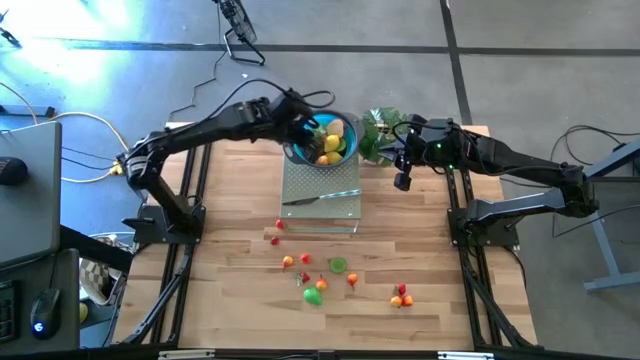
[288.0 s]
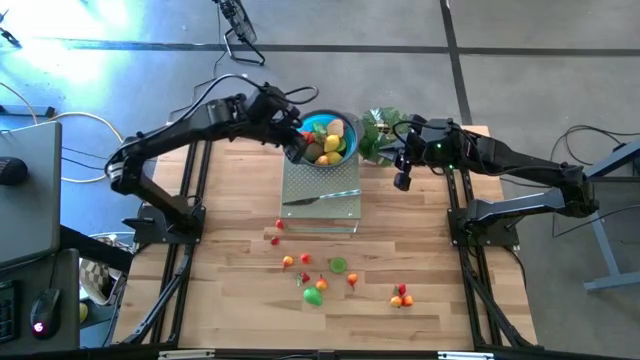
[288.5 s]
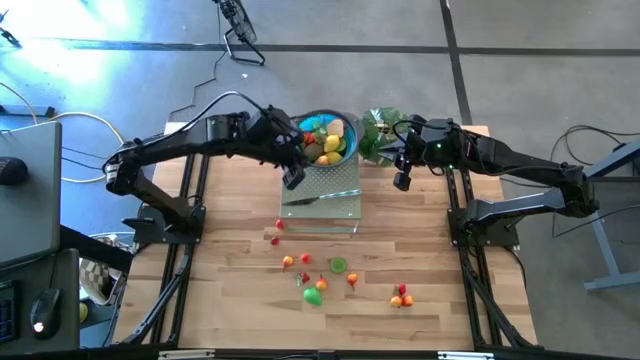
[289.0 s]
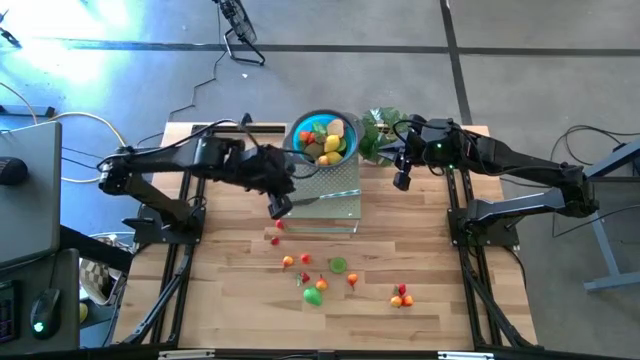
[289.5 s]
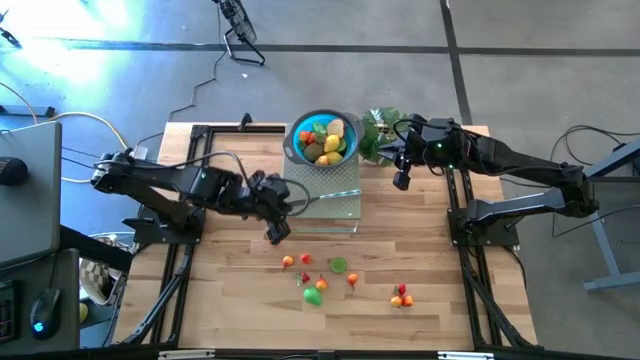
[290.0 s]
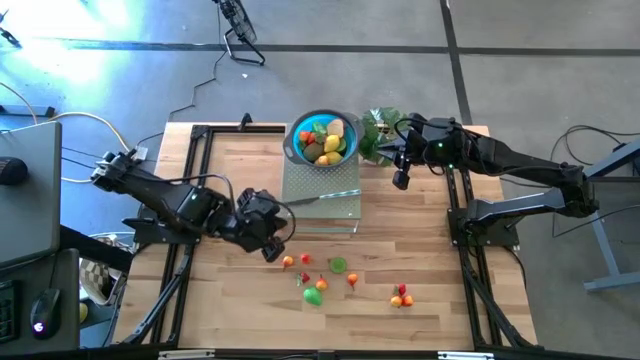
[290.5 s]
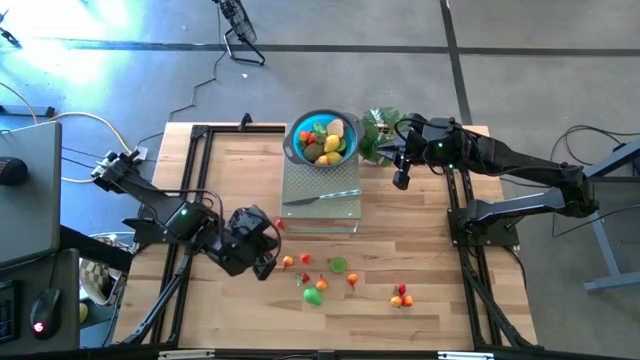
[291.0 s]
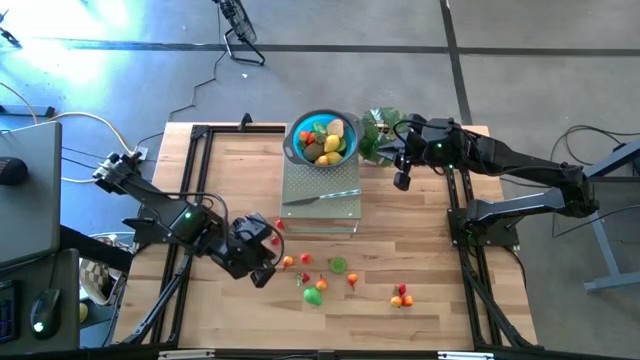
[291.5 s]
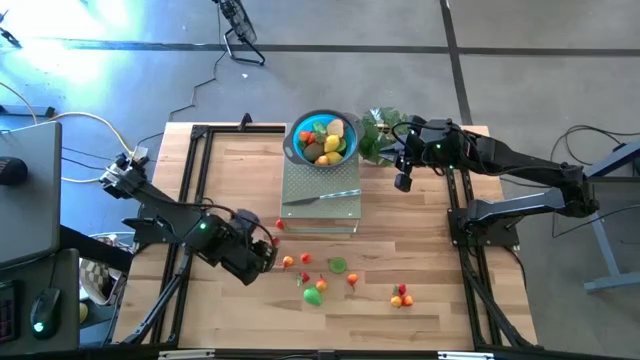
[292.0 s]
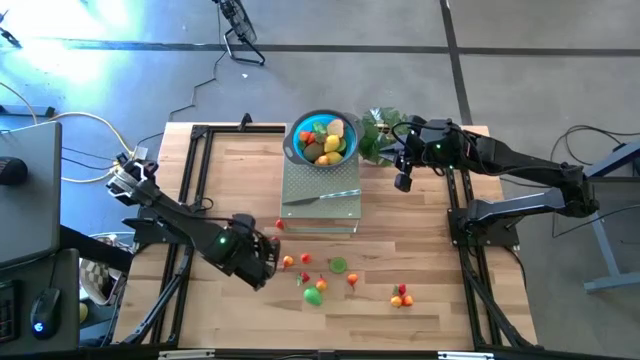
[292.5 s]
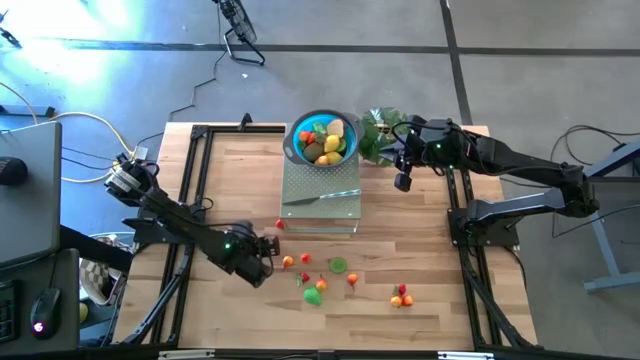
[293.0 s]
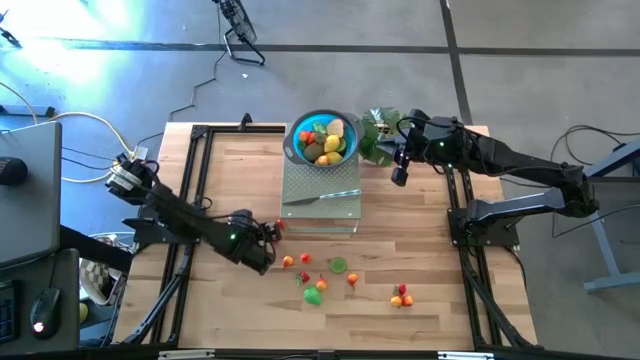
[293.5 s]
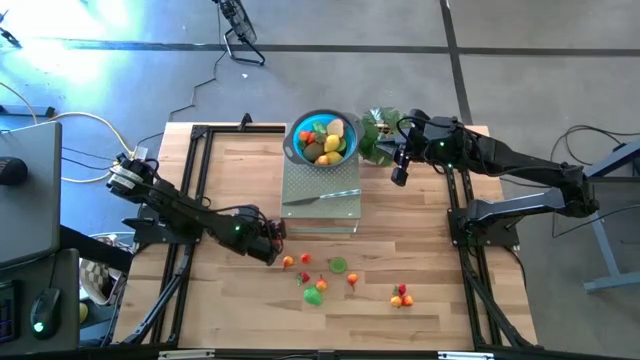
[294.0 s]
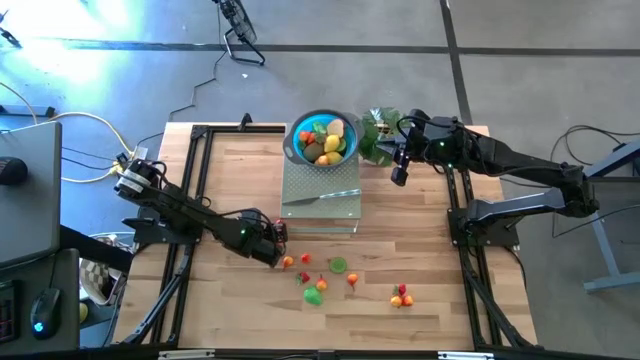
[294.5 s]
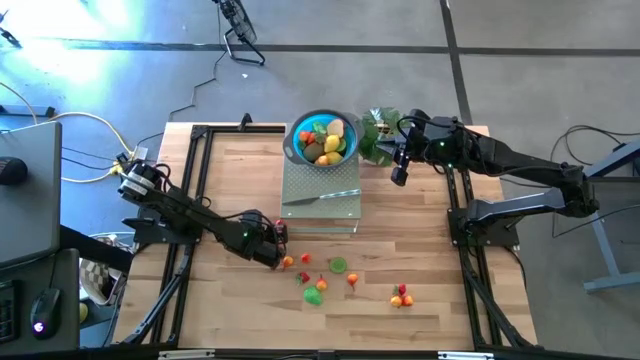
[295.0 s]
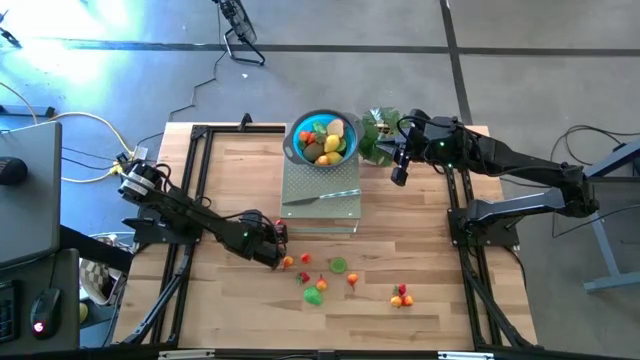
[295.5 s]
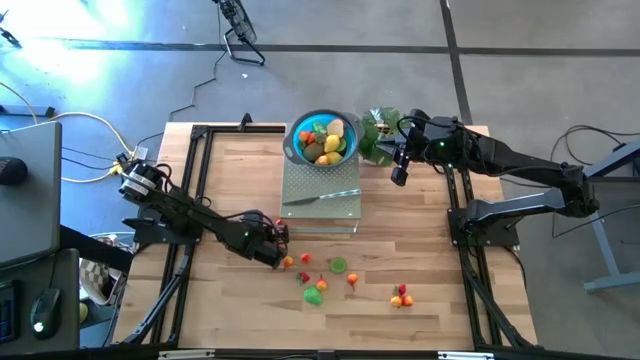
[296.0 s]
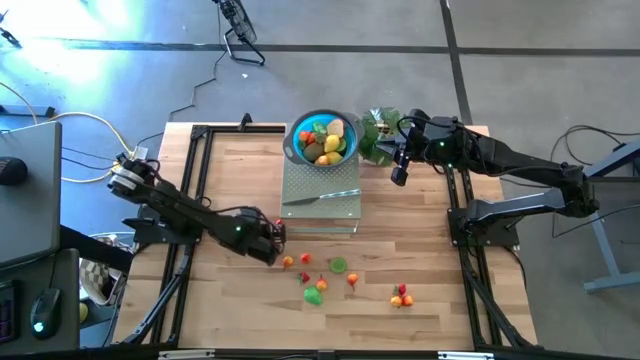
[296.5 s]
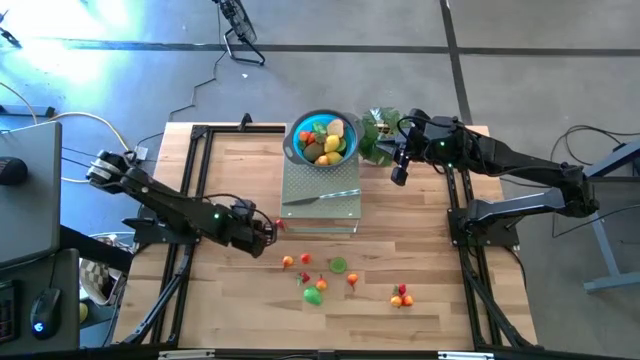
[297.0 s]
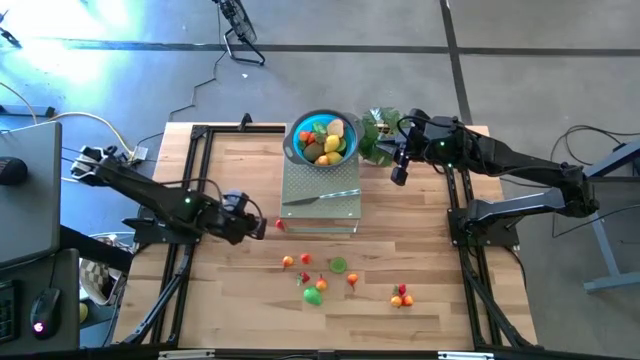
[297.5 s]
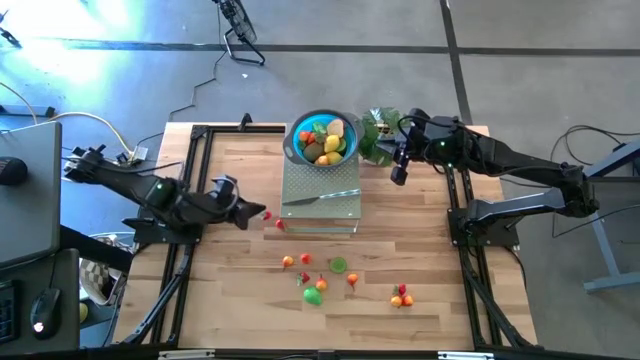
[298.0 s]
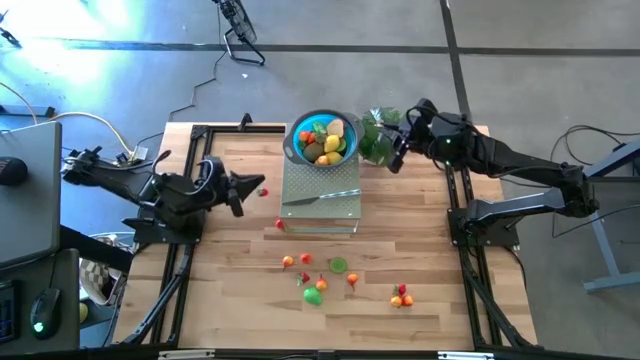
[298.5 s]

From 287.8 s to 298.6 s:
Task: Pick & Place Fruit
Put the red strawberry in the blue bowl on the shelf

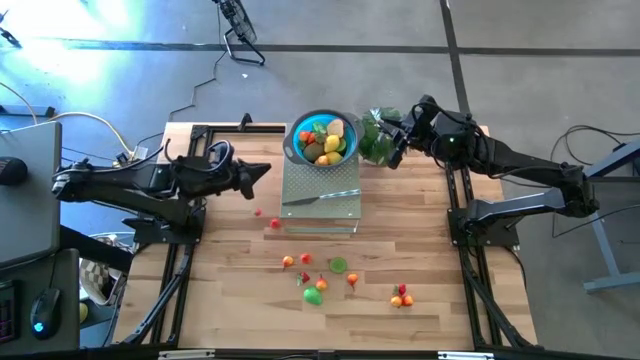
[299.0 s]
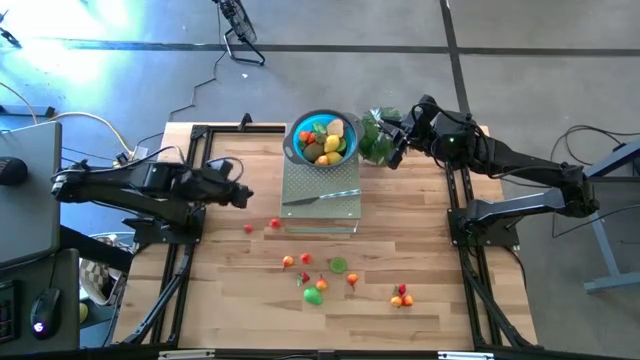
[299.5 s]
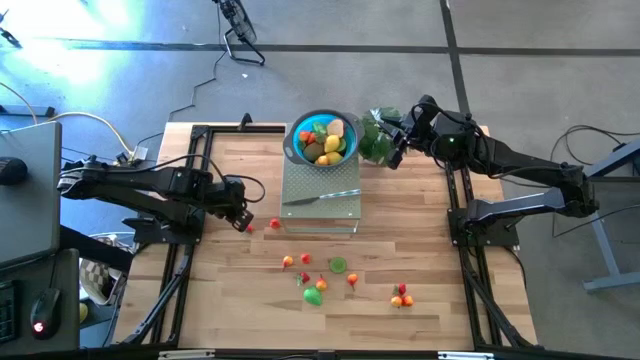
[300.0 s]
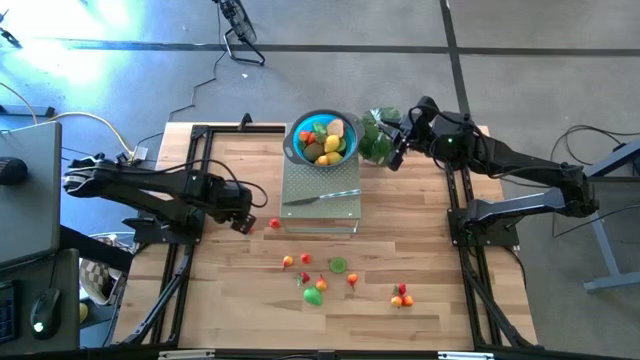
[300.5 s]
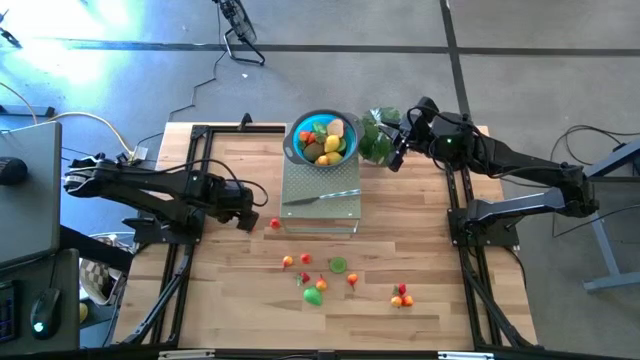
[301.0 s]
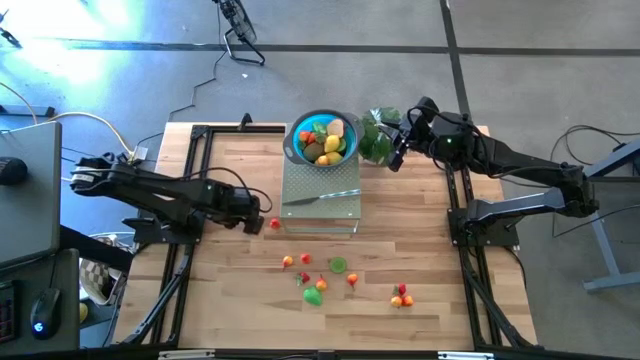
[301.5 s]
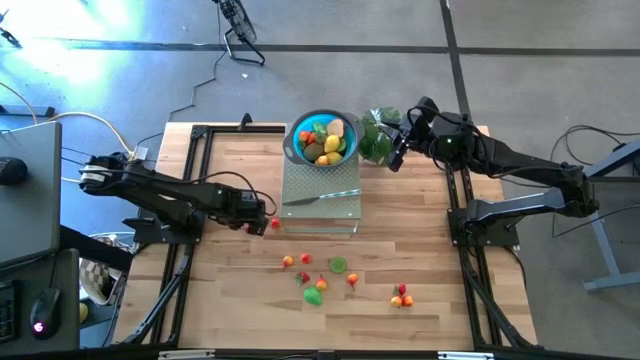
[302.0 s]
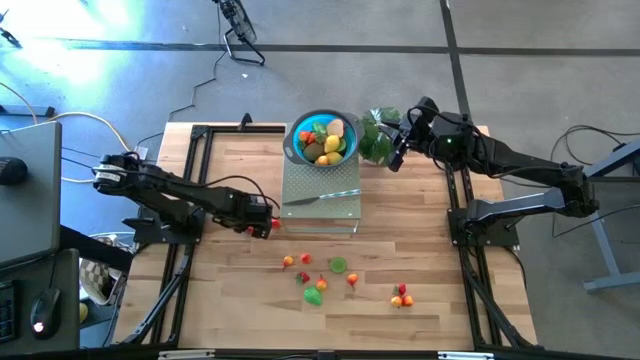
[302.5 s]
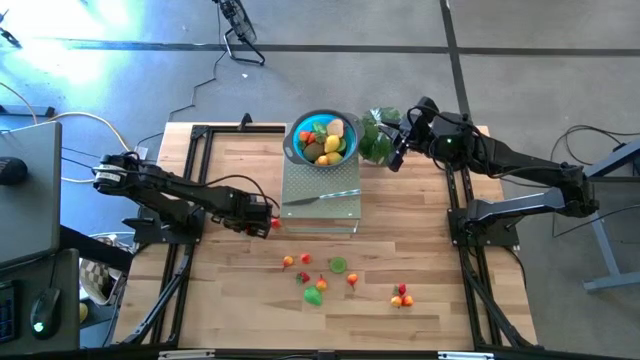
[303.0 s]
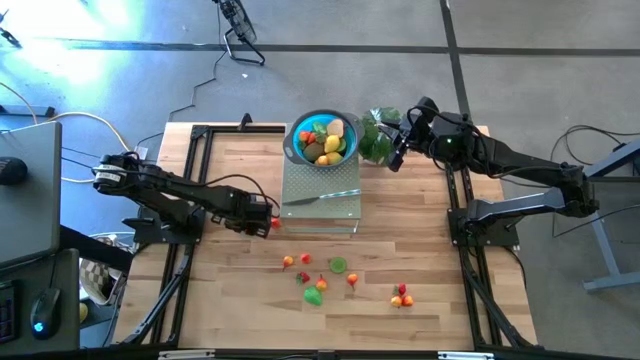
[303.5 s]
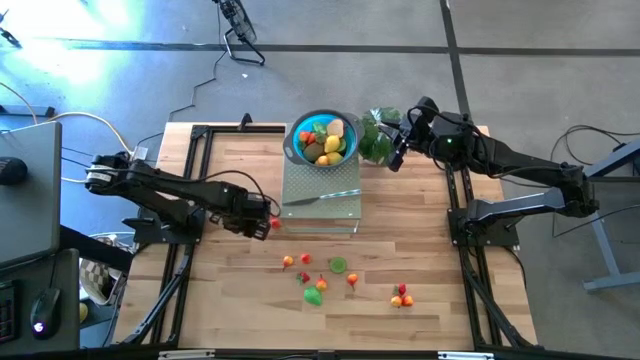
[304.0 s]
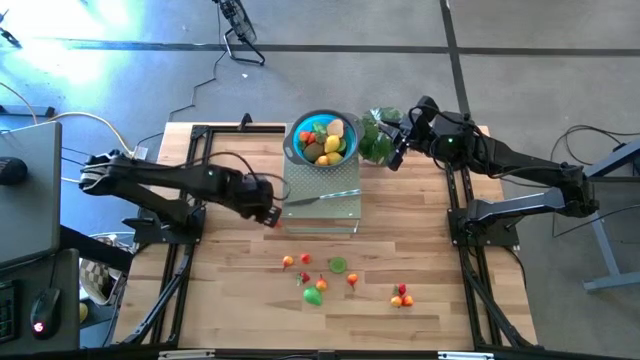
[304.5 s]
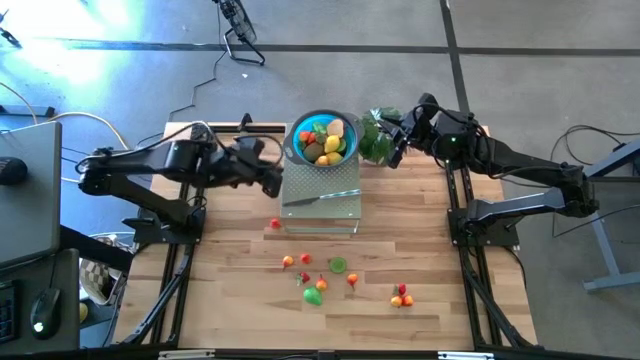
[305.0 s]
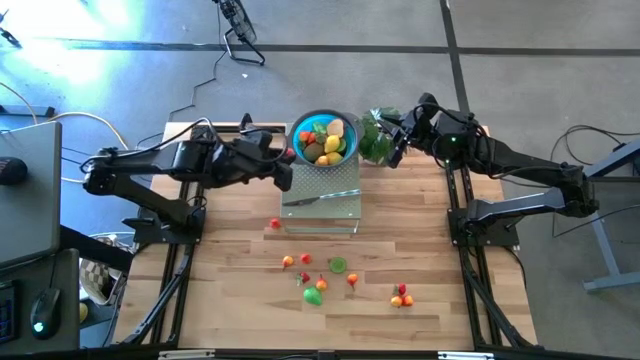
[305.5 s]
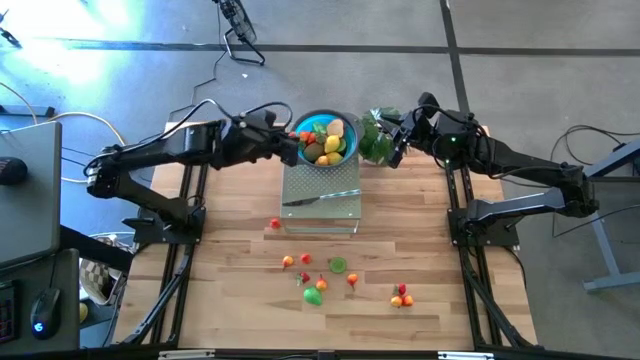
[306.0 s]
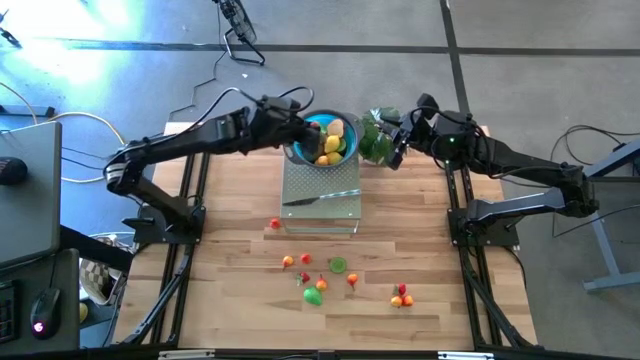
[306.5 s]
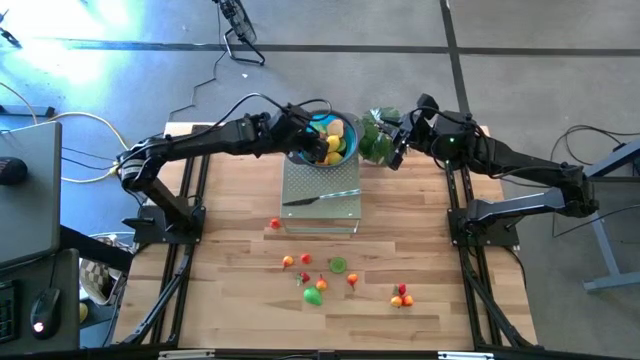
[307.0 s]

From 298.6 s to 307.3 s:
Put the red strawberry in the blue bowl on the shelf

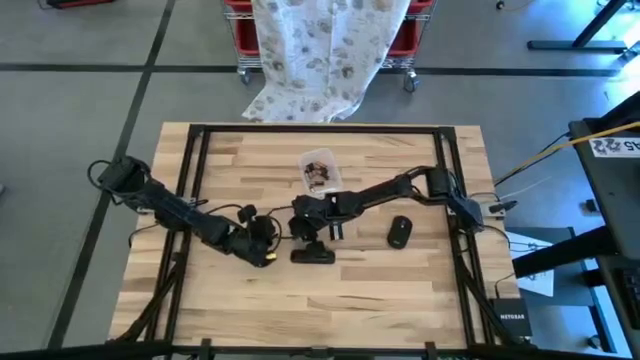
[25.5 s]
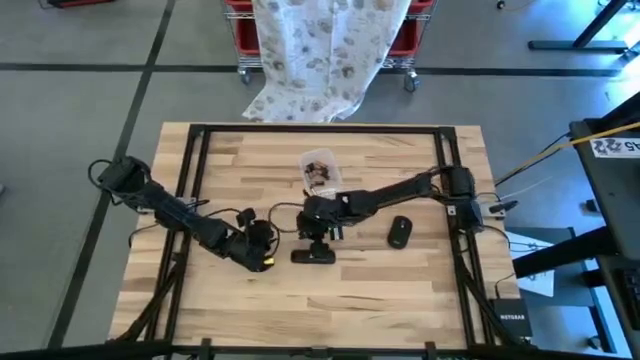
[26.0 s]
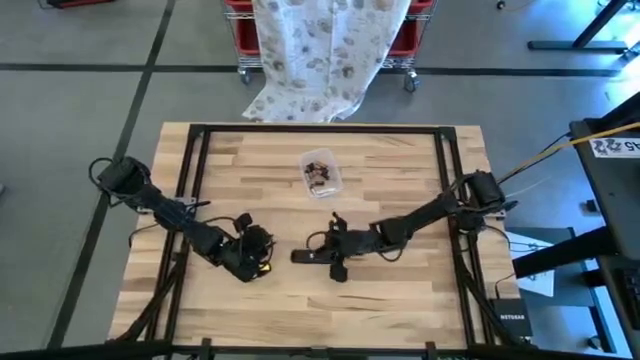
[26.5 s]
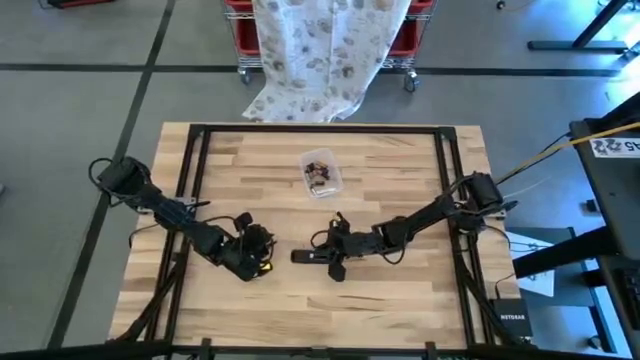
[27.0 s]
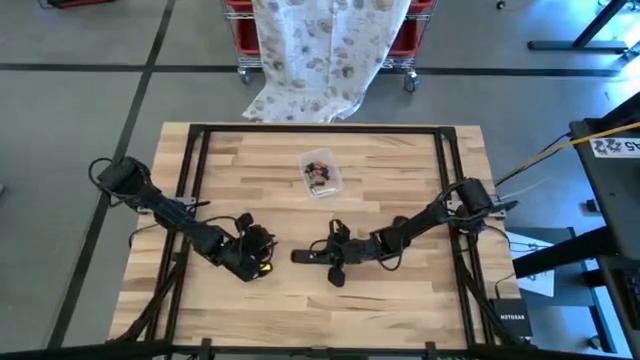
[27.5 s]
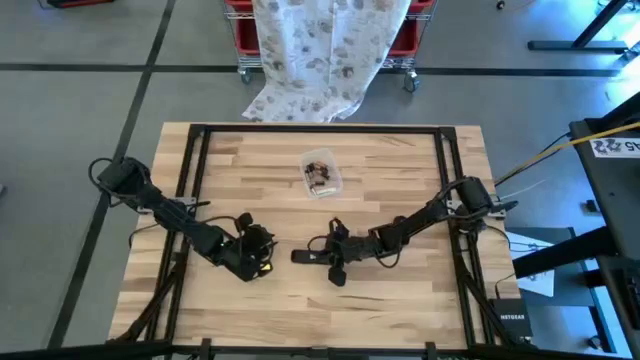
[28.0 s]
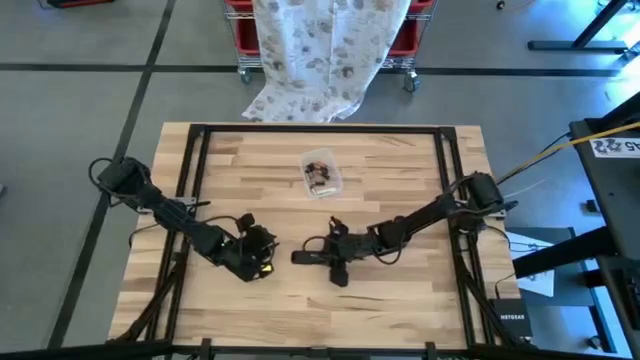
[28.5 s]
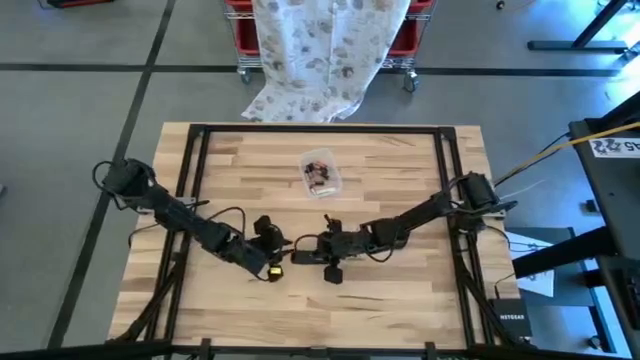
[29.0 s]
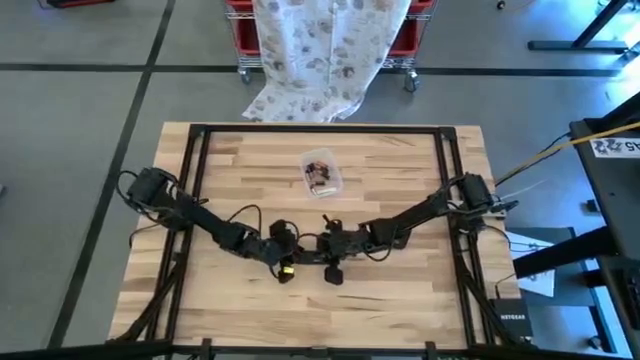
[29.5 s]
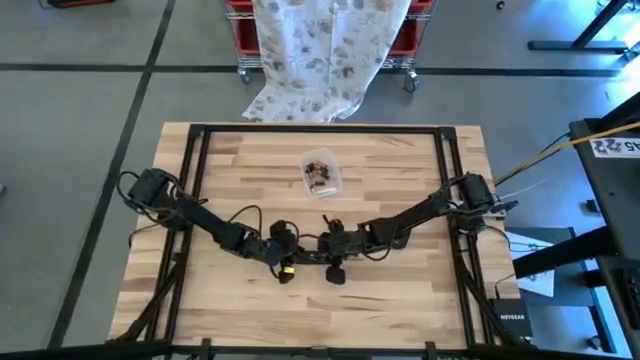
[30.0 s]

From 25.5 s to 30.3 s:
Task: Insert battery
Insert the white battery into the remote control
